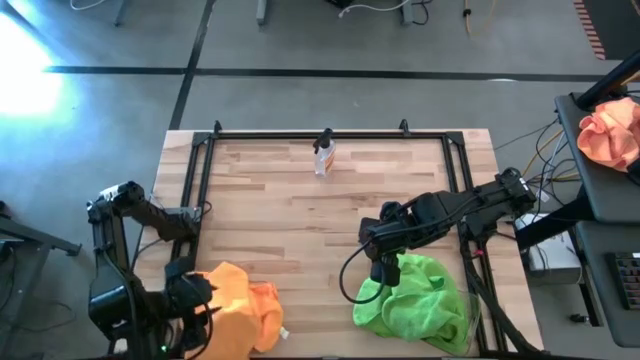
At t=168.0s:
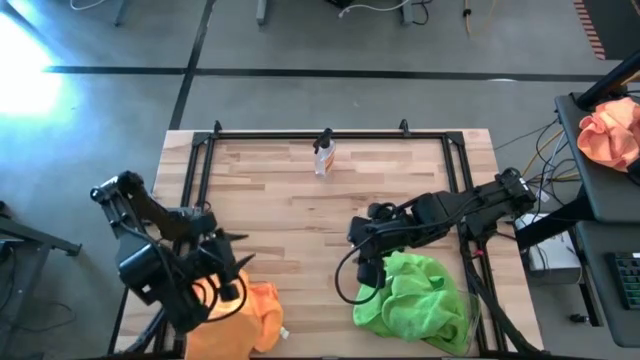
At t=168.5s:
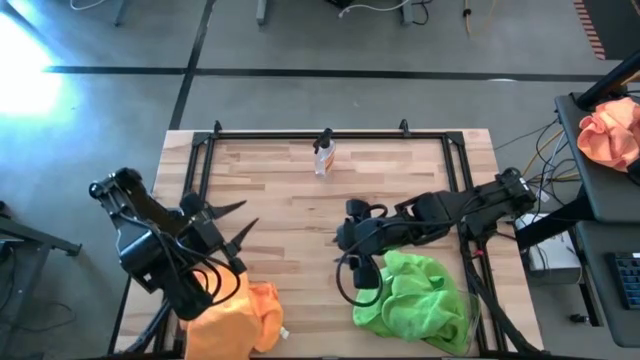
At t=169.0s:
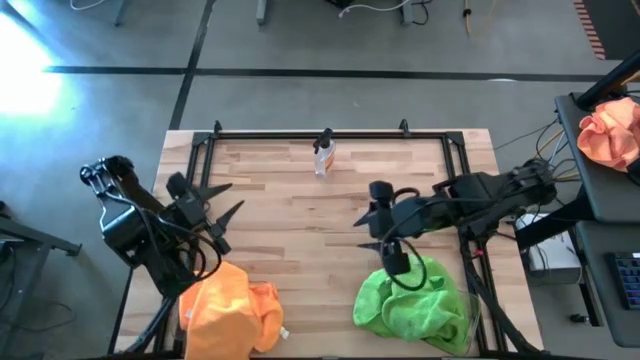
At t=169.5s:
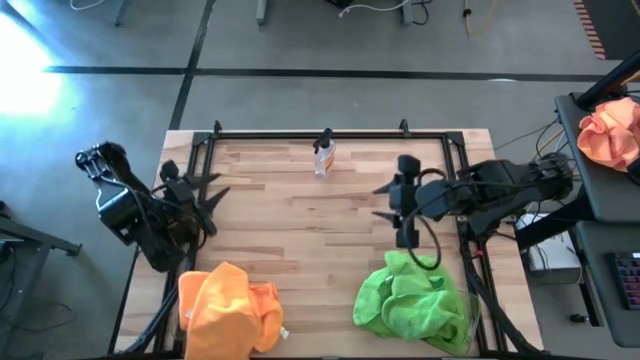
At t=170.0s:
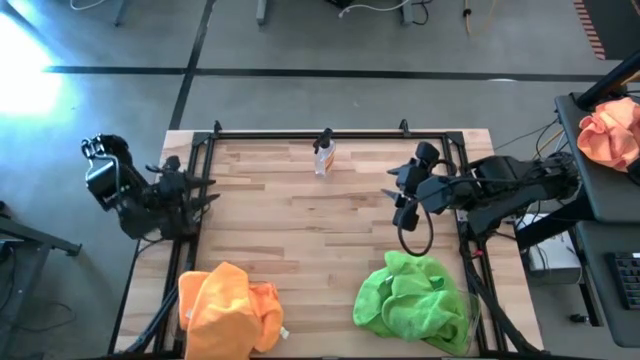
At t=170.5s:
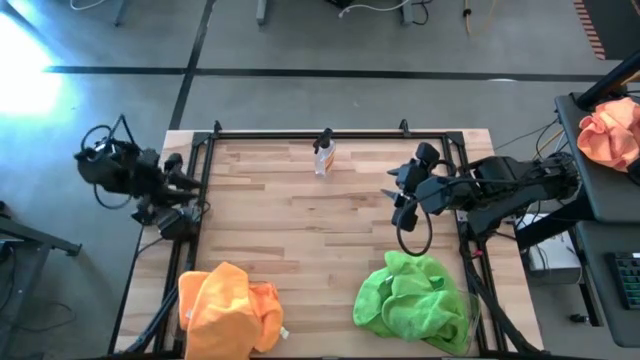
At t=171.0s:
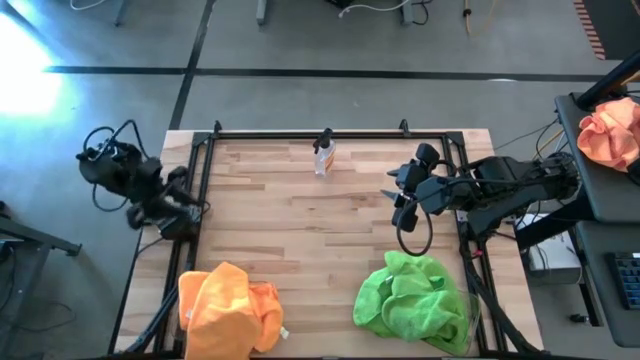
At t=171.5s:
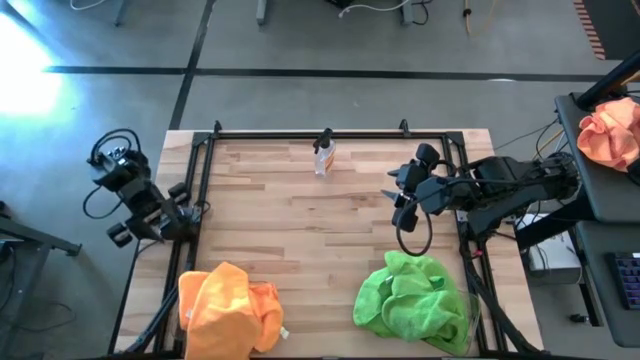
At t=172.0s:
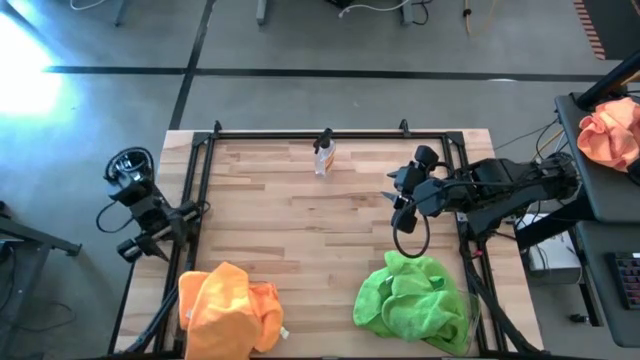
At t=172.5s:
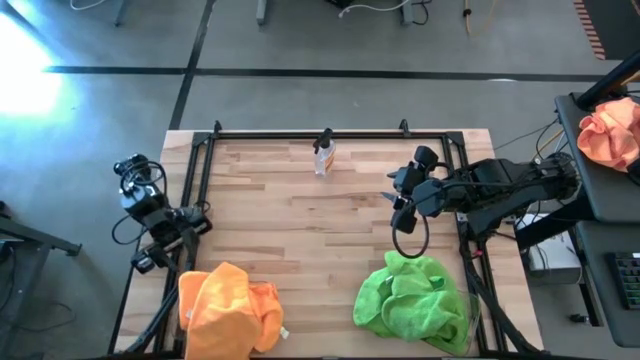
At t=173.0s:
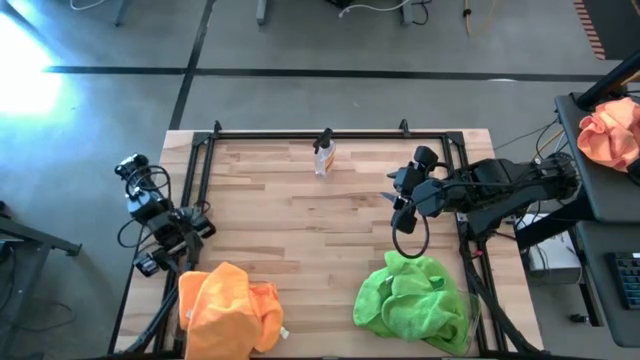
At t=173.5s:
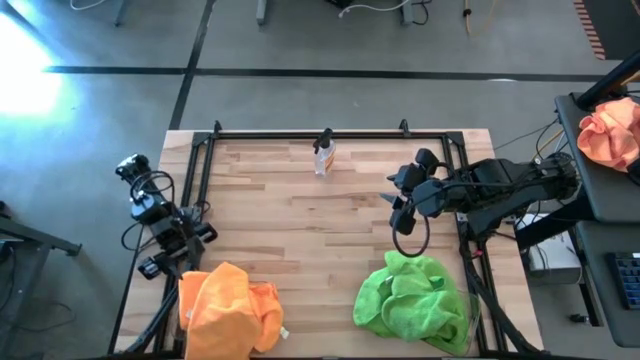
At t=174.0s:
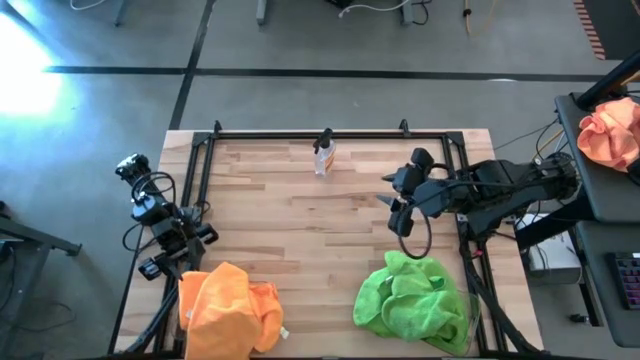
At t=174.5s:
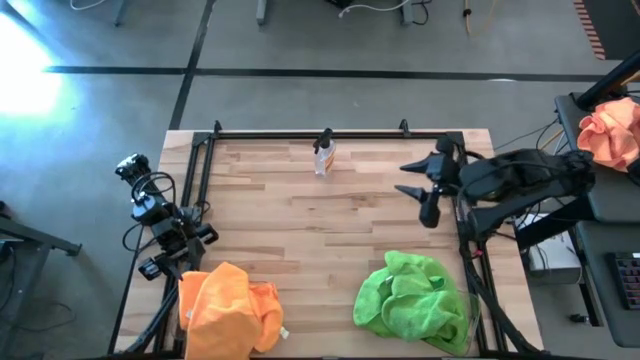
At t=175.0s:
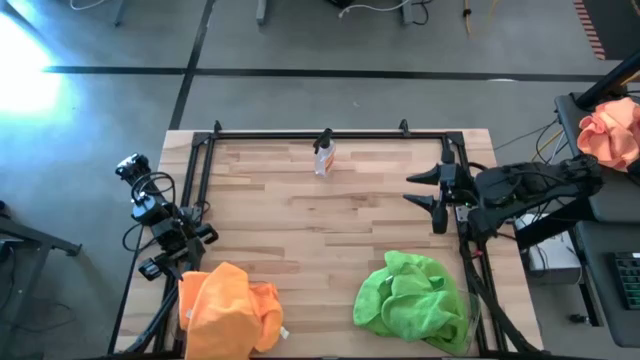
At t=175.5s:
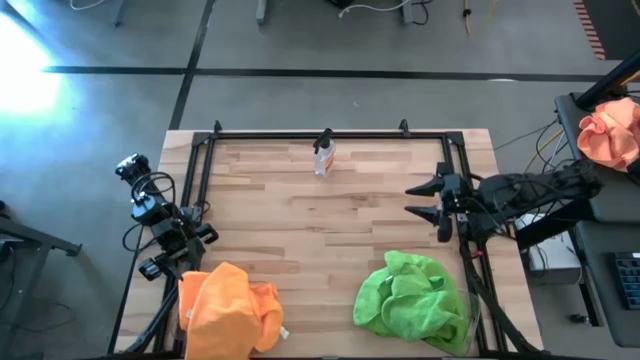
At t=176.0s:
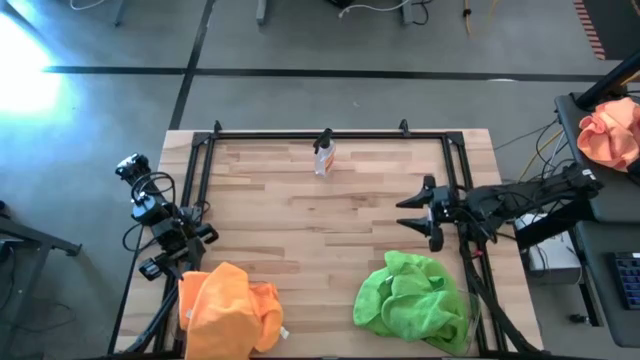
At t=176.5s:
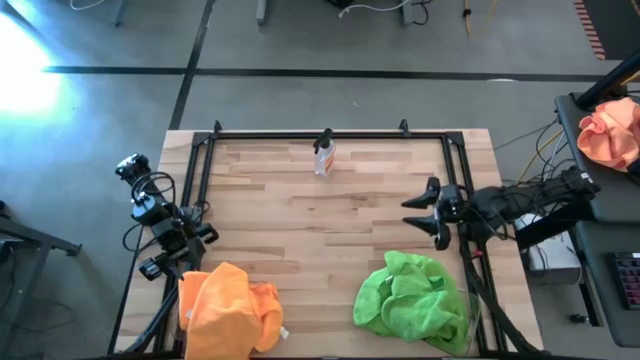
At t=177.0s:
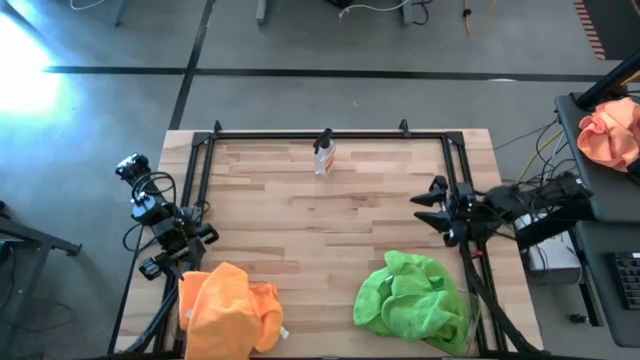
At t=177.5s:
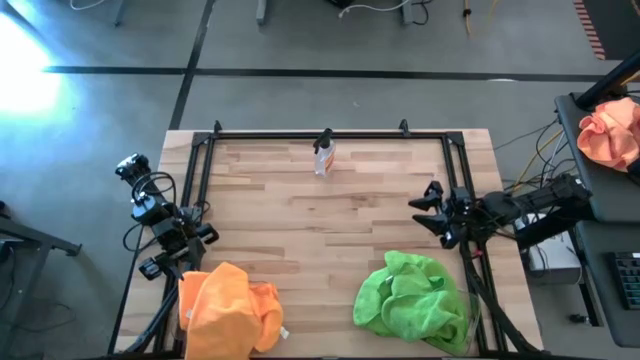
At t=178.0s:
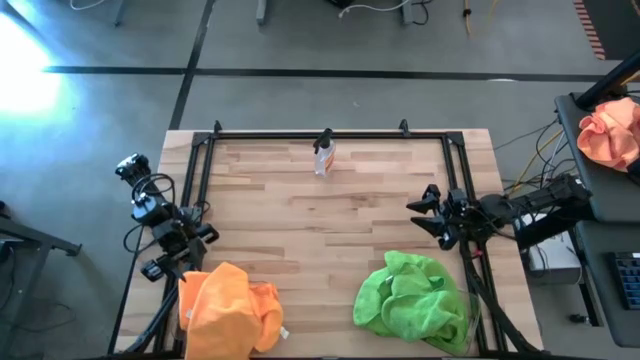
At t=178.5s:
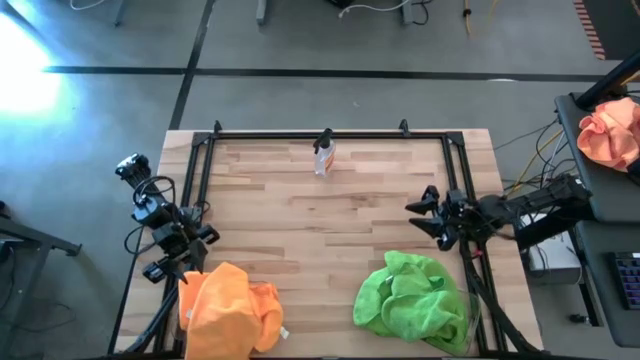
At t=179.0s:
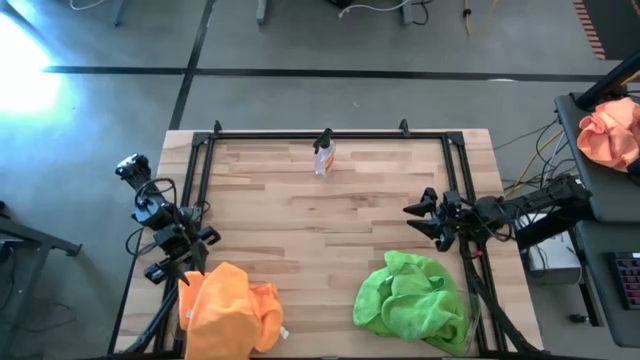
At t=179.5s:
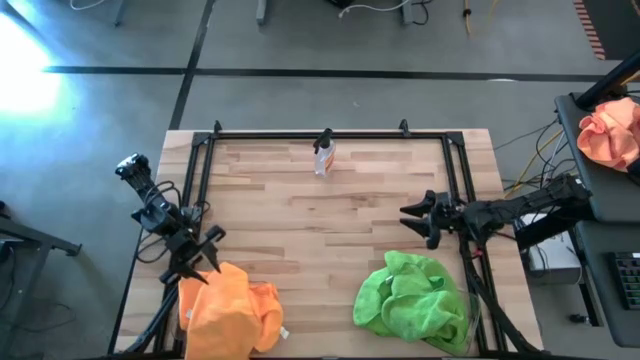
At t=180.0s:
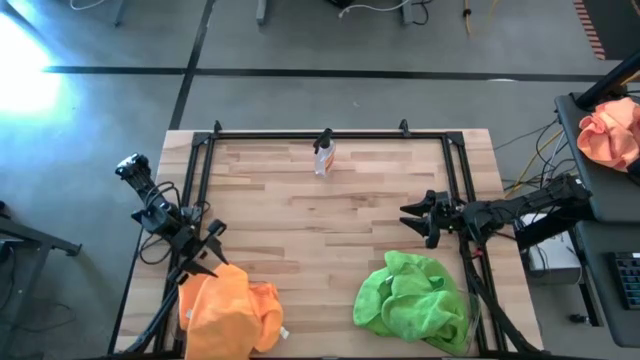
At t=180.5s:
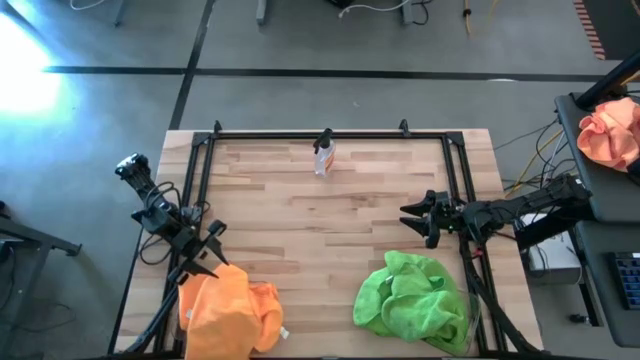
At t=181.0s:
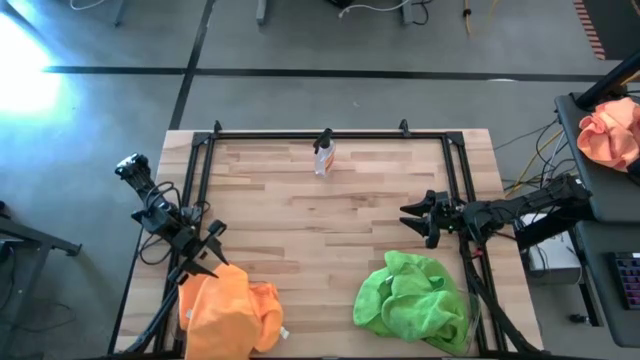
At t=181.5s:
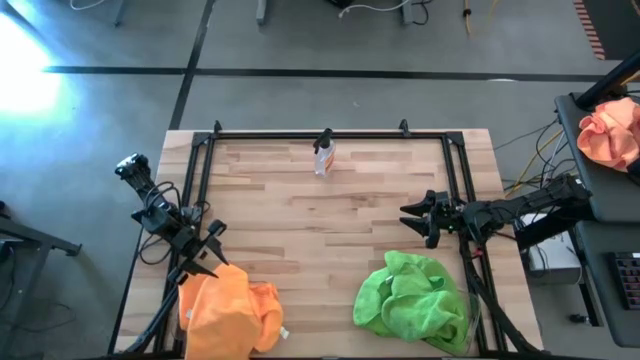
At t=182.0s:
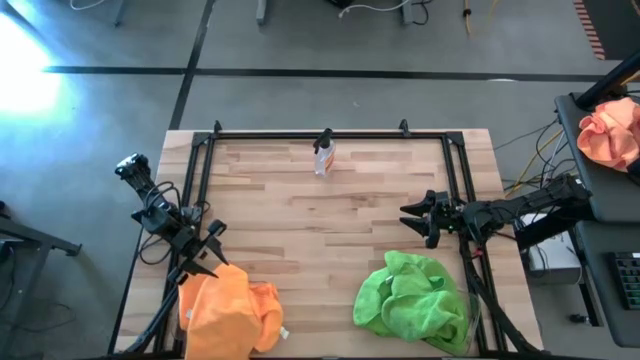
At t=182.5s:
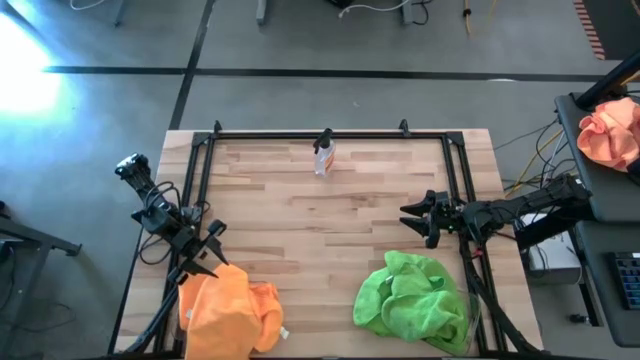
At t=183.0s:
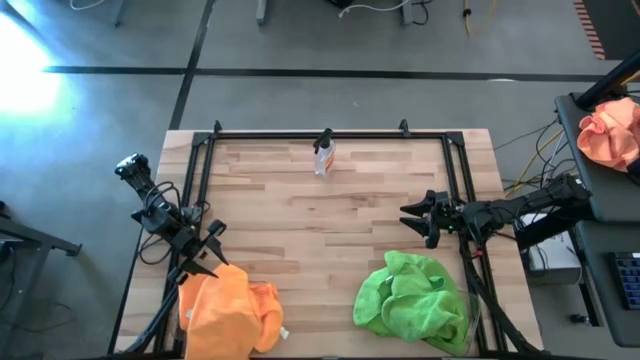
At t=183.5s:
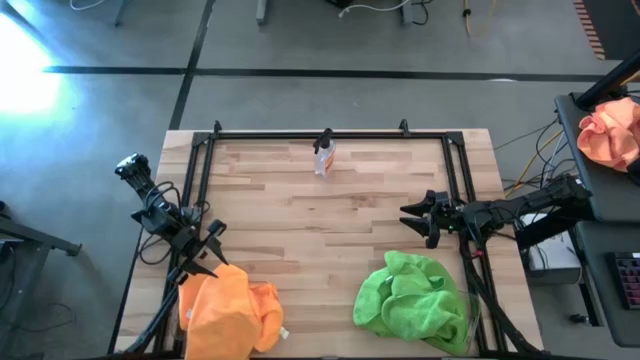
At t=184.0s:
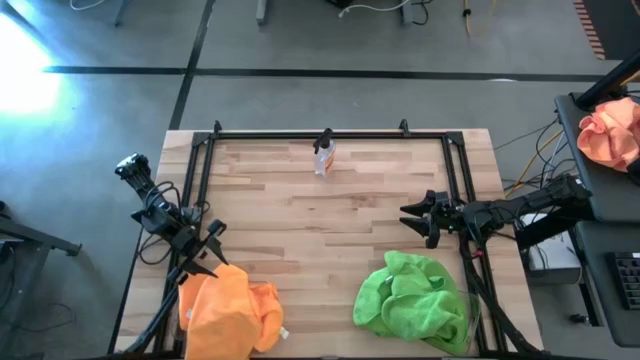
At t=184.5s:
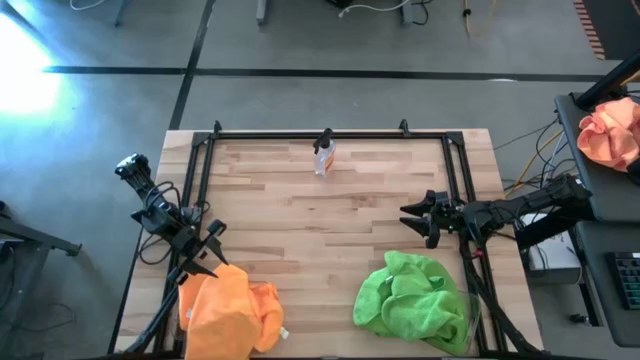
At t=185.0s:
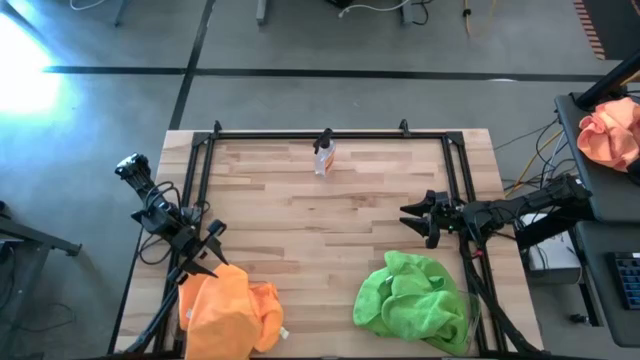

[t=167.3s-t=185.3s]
Task: Sort microfiber towel by color & place in baskets
Return to Home Position

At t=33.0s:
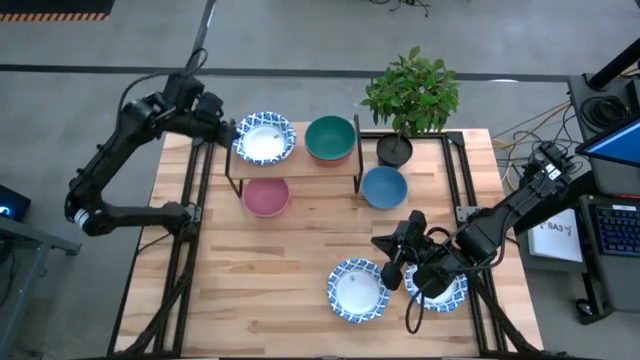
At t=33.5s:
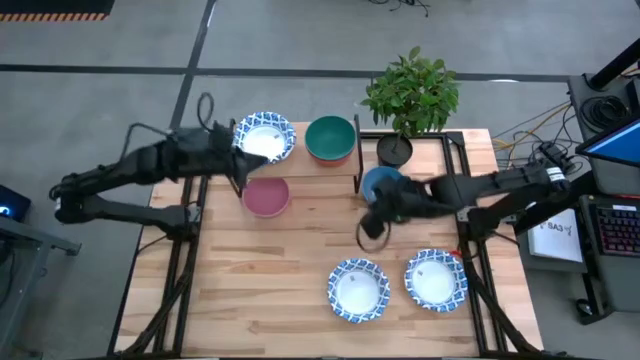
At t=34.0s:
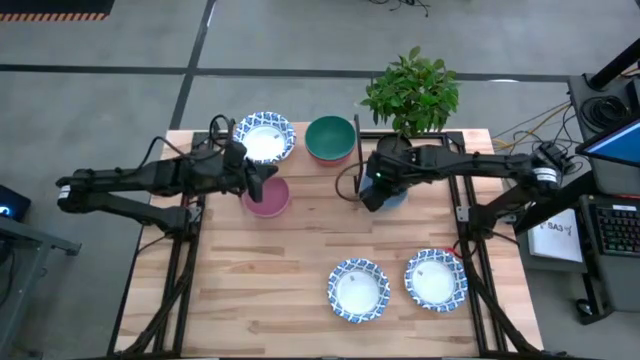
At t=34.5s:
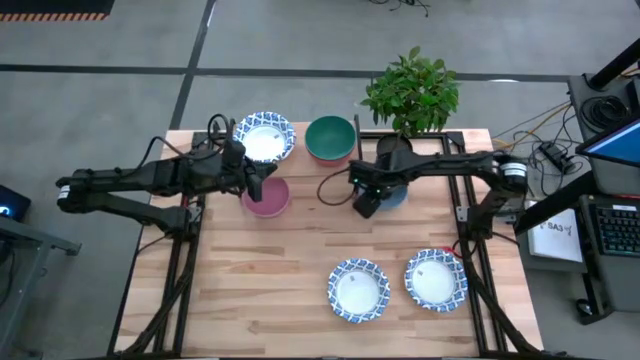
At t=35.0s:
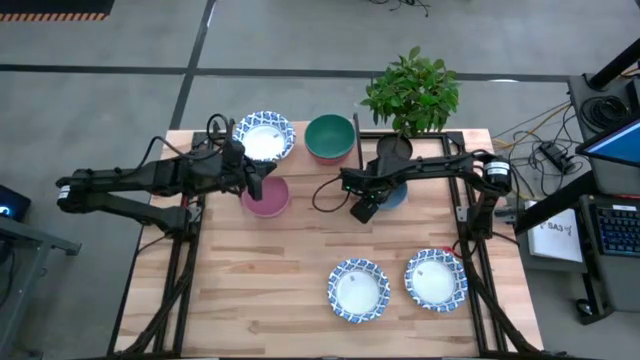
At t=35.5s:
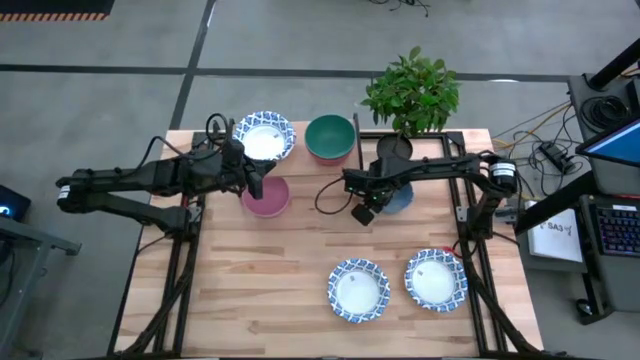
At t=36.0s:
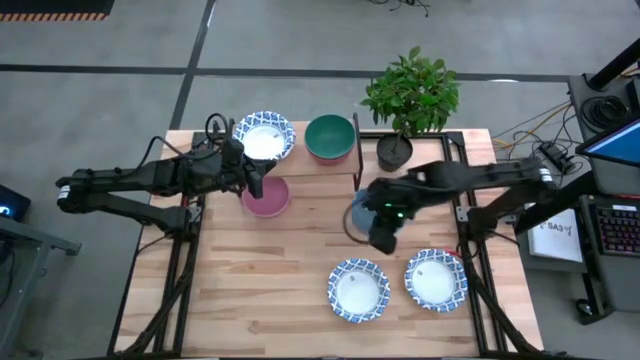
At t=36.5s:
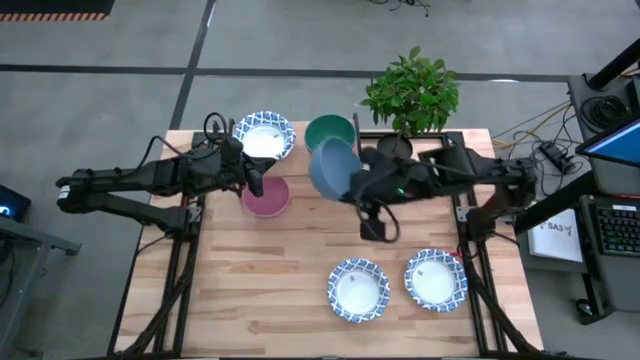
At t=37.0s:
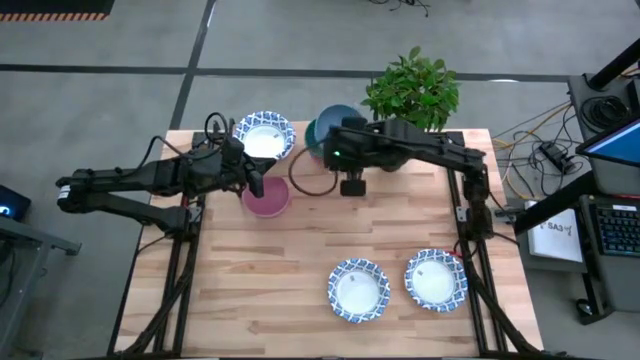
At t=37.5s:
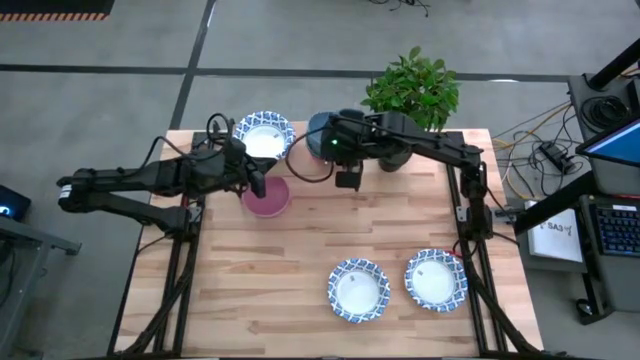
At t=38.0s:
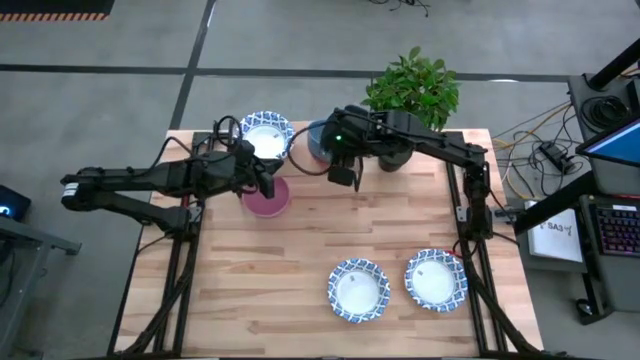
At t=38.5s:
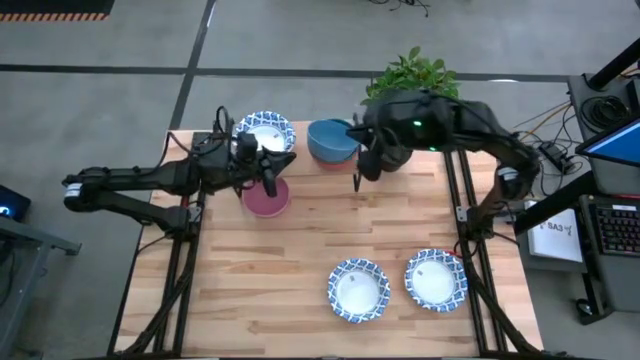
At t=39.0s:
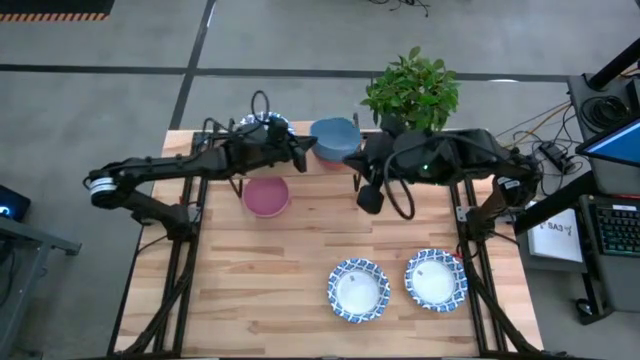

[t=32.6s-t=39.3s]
Task: Place and stack bowls onto a shelf
Stack the blue plastic bowl on top of the green plastic bowl on the shelf
